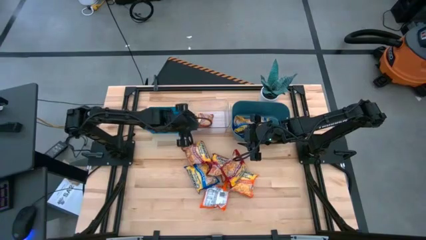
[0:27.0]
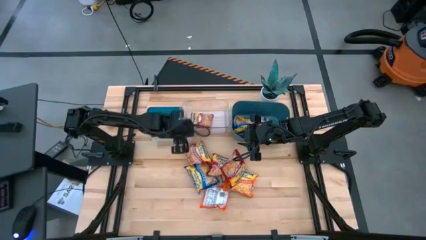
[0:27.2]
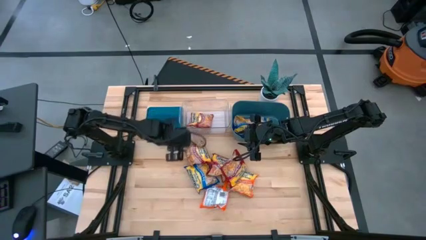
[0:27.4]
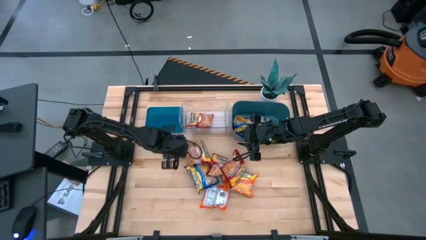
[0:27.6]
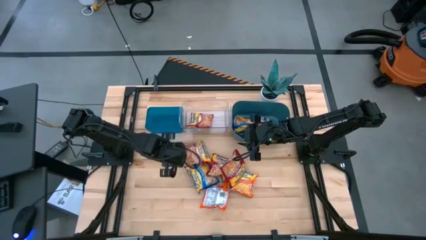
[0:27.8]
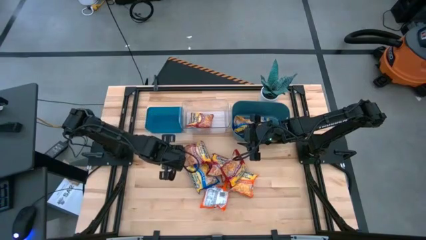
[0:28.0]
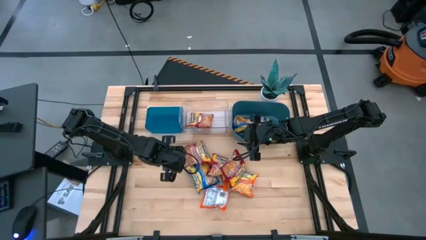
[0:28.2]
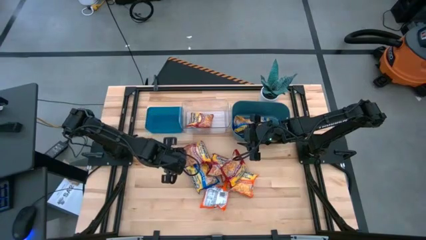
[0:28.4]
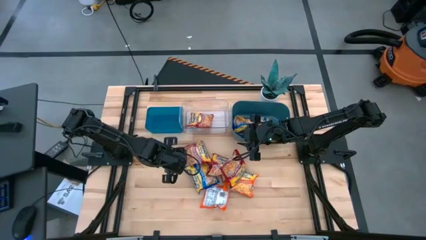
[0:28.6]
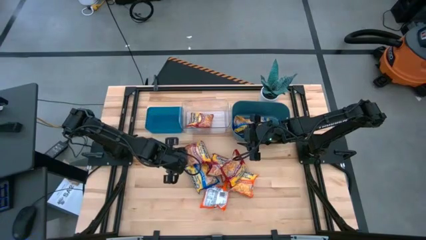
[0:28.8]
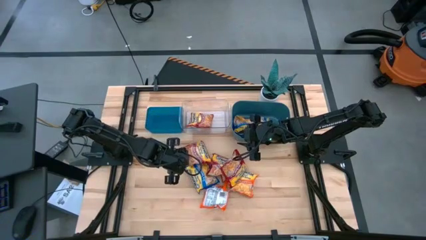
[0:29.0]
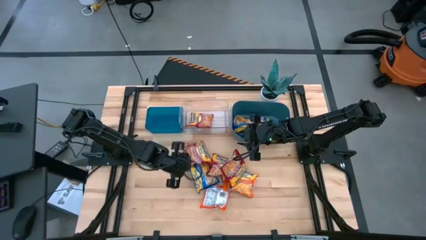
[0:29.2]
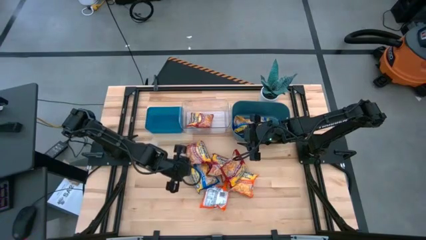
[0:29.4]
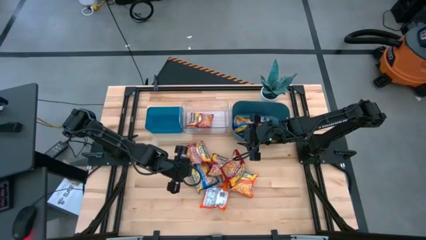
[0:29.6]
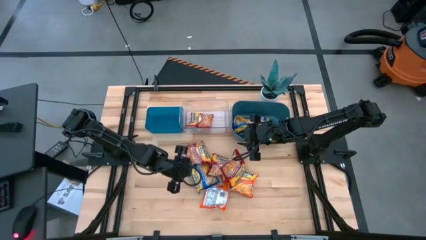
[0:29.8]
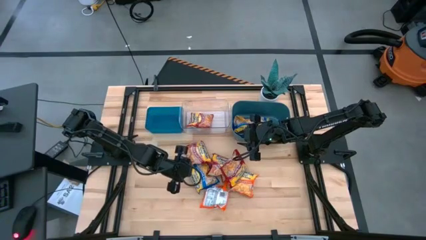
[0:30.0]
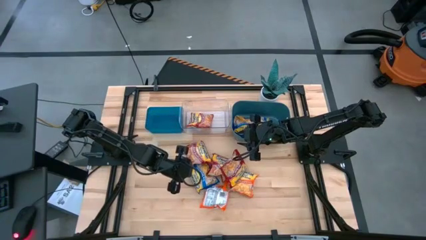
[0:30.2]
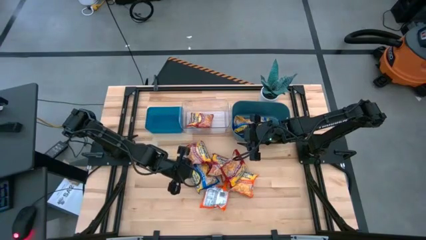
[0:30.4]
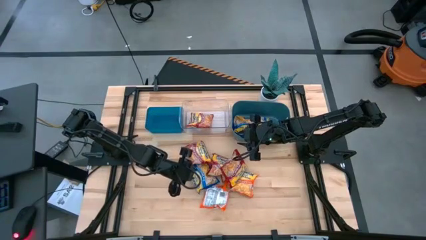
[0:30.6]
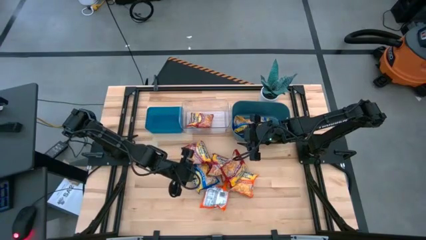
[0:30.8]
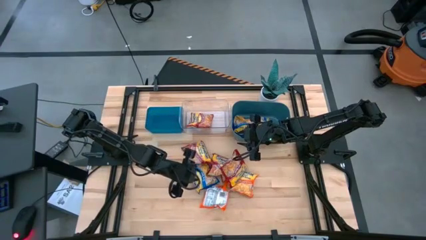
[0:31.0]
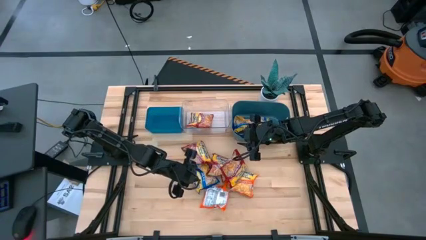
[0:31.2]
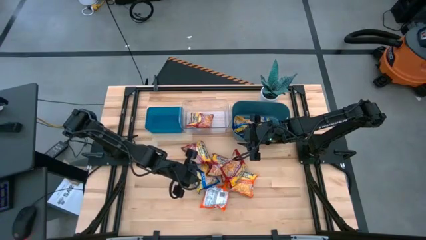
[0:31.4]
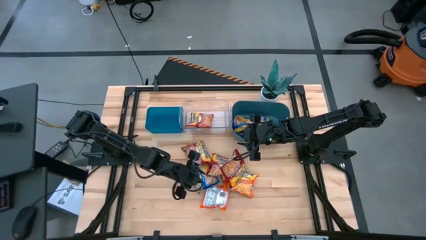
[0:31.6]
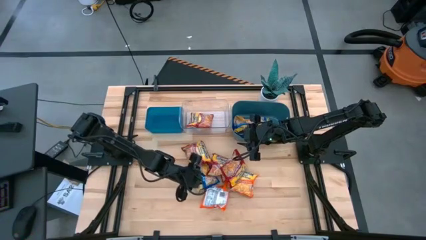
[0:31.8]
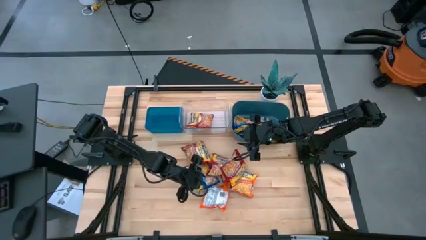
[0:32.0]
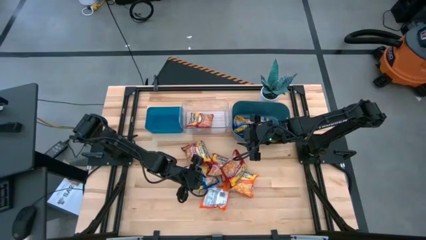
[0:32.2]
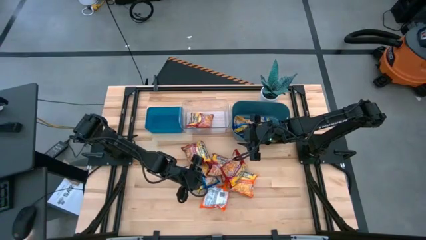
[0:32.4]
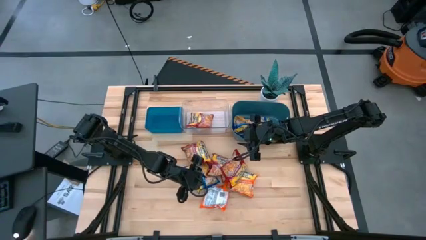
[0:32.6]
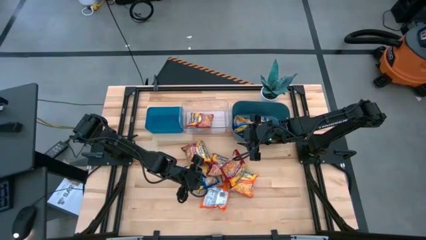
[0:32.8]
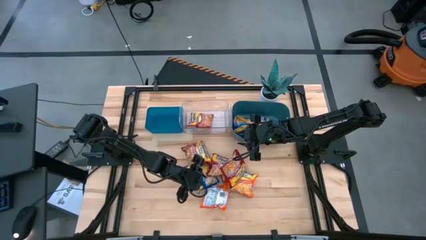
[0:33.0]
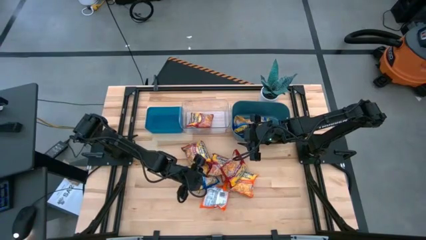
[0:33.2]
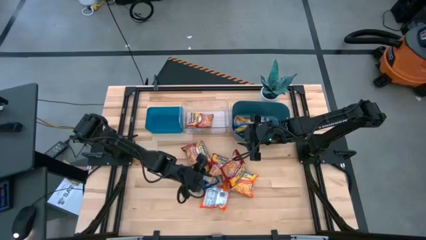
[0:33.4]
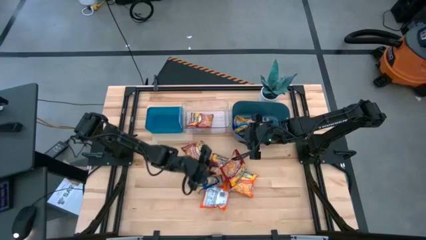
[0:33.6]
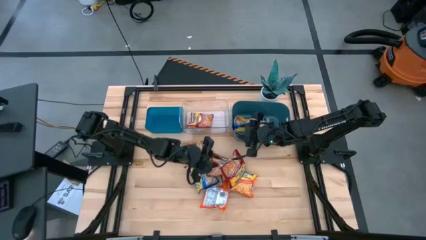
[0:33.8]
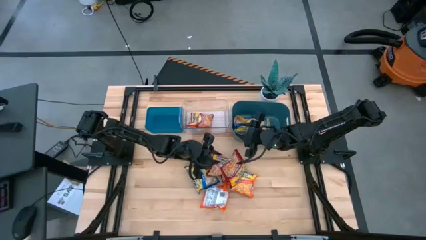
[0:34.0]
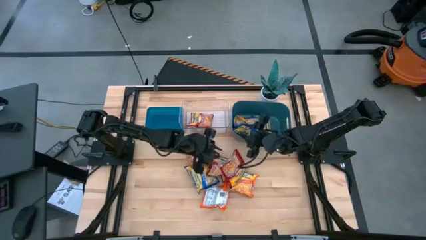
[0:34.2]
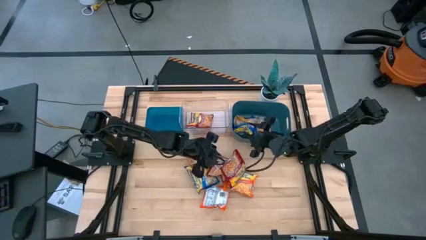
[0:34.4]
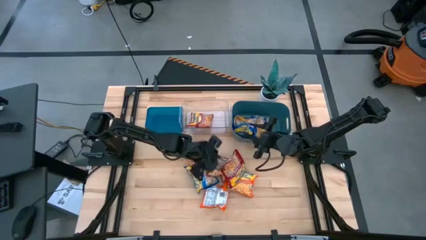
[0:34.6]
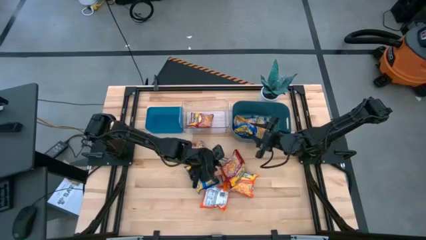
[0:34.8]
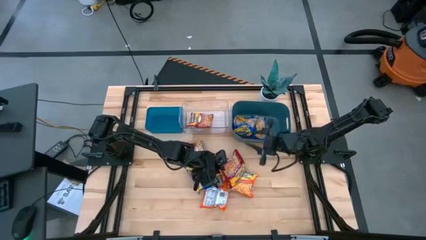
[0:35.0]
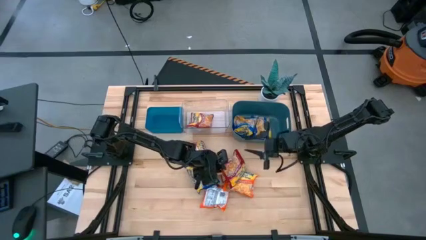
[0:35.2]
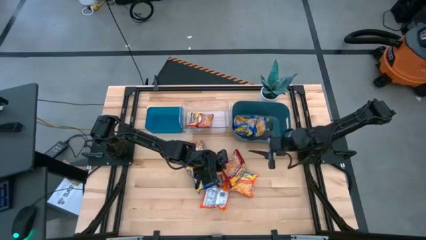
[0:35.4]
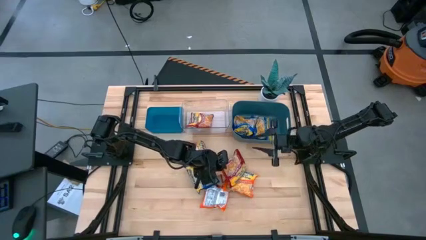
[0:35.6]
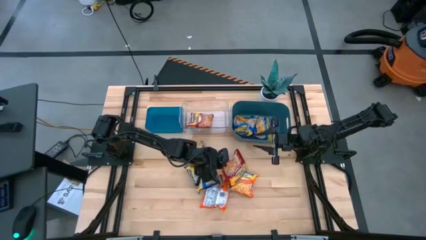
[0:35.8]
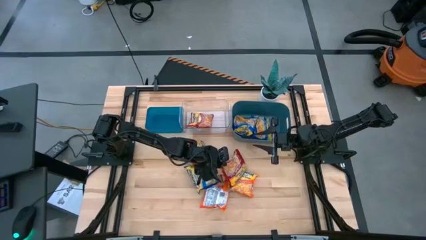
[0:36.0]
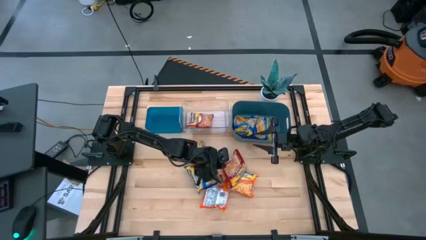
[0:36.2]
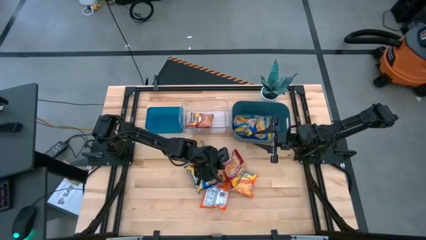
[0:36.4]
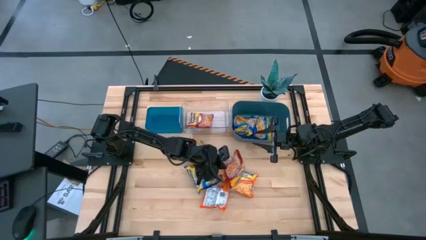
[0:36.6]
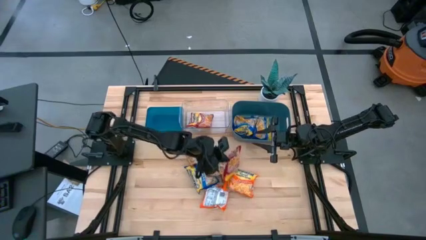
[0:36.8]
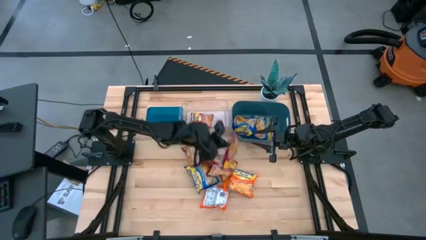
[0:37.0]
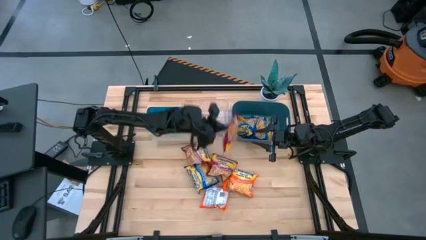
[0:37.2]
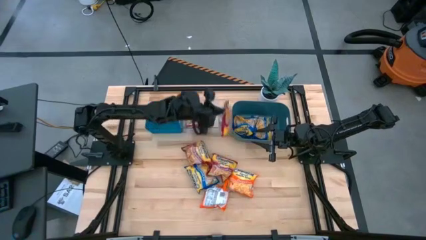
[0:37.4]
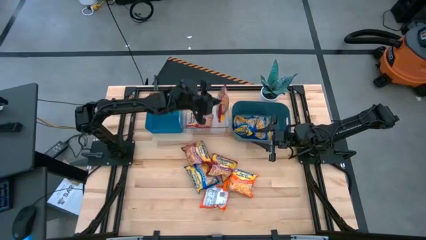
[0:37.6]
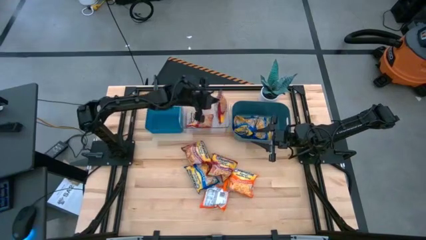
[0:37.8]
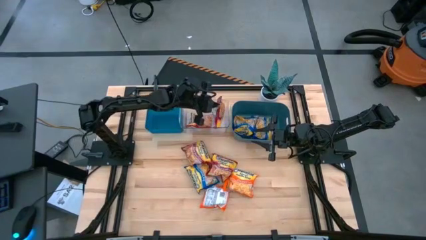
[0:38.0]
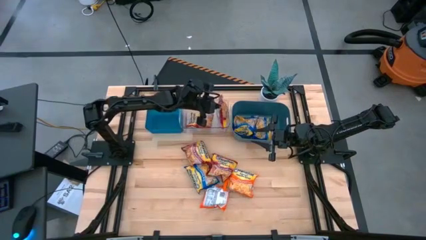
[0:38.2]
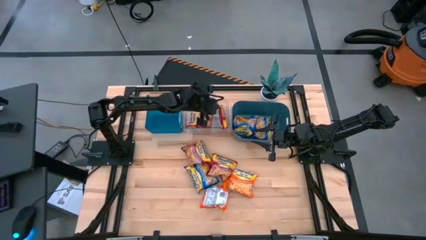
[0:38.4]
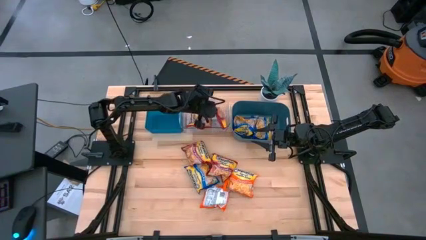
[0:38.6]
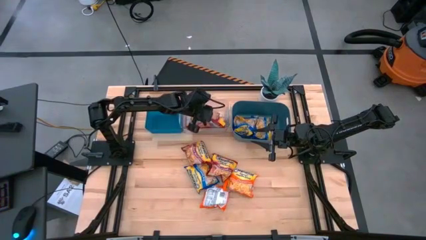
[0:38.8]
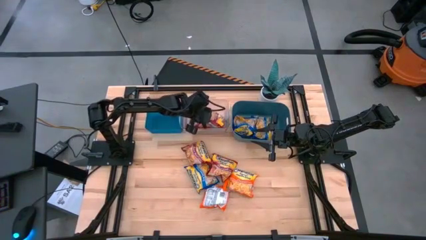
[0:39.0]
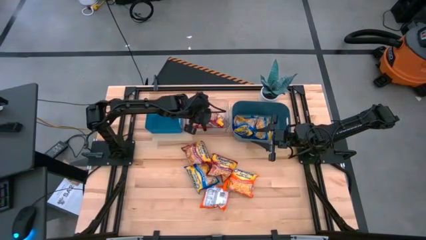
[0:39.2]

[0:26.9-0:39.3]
Task: Sort Maruchan noodles
Put the red noodle pack into the transparent bin

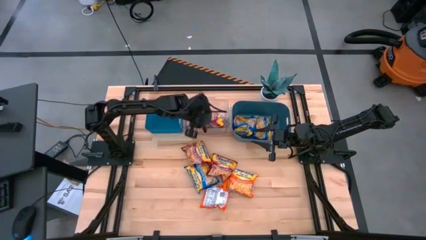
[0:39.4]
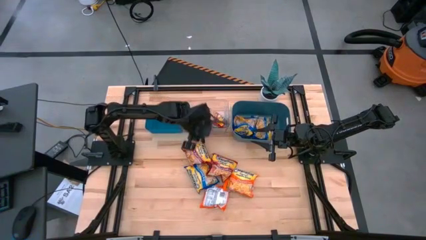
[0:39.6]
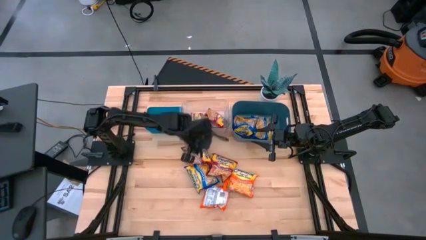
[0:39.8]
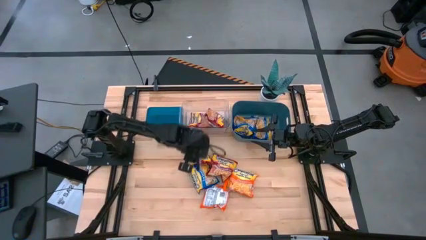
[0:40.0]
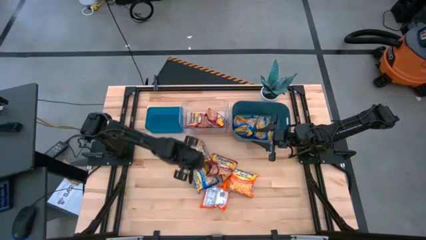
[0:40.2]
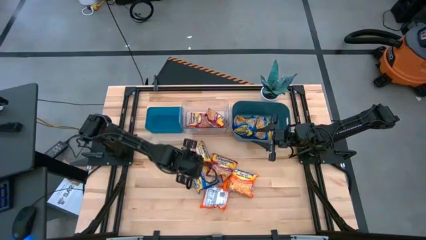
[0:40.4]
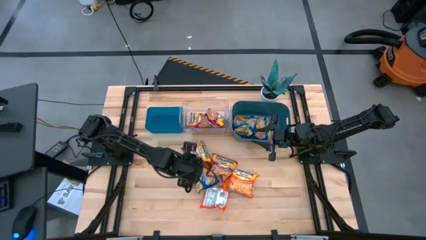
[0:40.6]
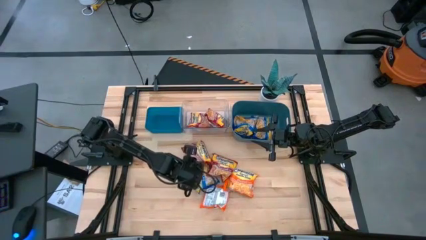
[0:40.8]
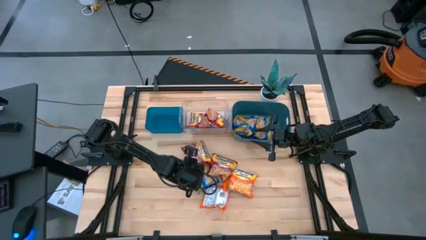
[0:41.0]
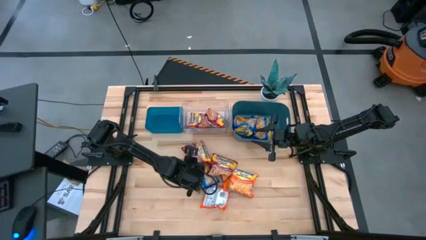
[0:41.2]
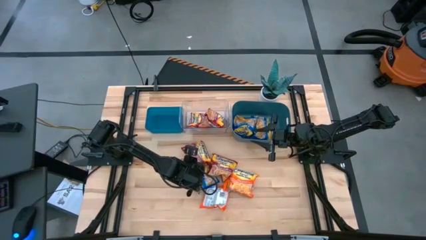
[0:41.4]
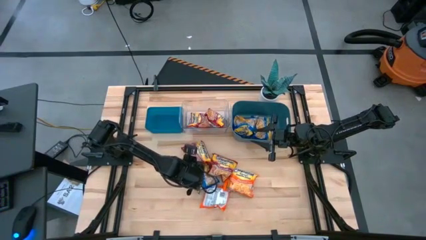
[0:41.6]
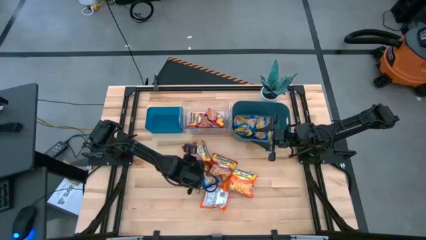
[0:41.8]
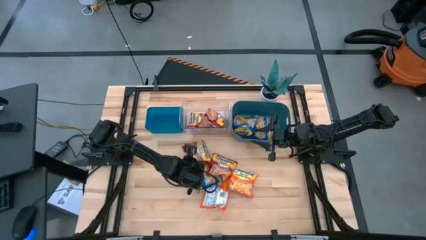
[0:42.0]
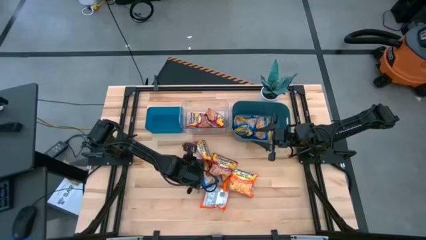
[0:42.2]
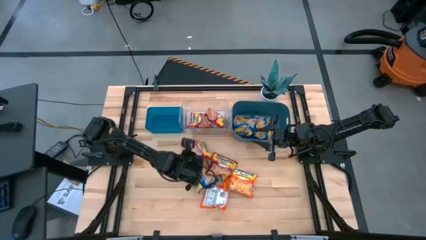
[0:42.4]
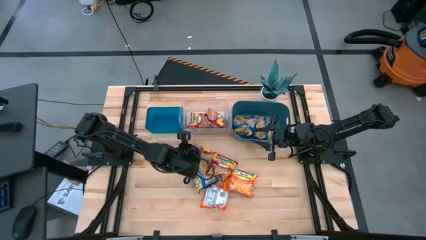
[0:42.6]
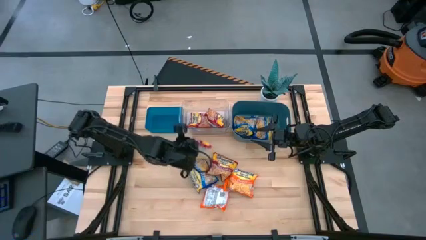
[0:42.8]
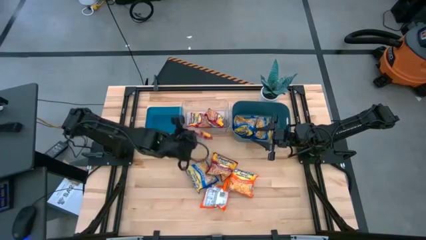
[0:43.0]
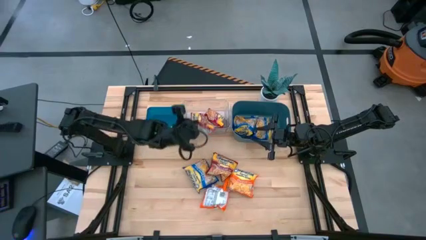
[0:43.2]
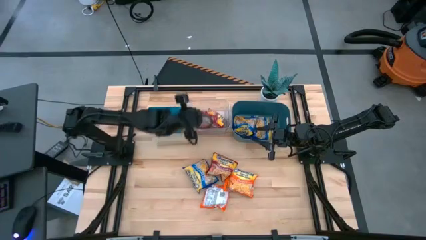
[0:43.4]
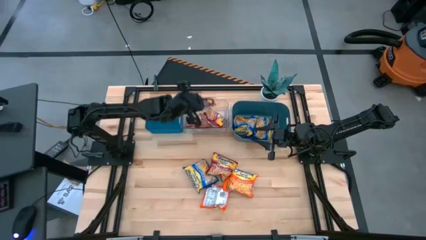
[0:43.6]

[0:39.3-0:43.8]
Put the red noodle pack into the transparent bin
